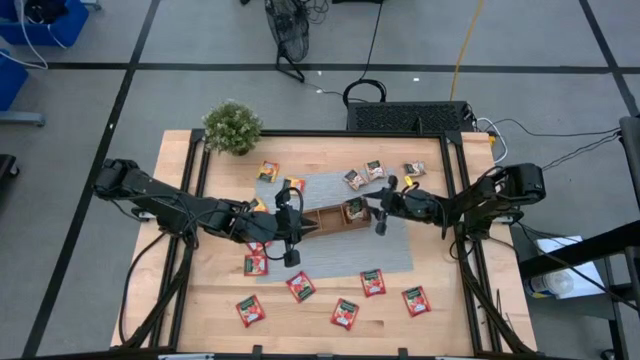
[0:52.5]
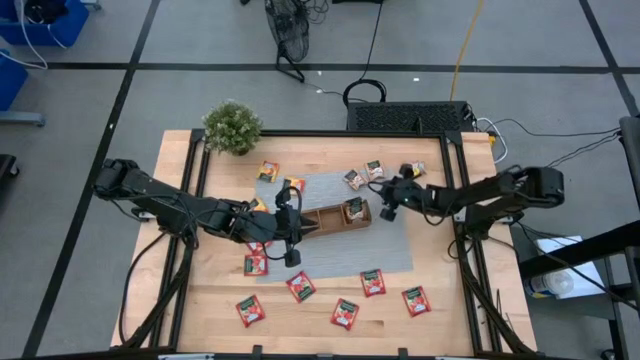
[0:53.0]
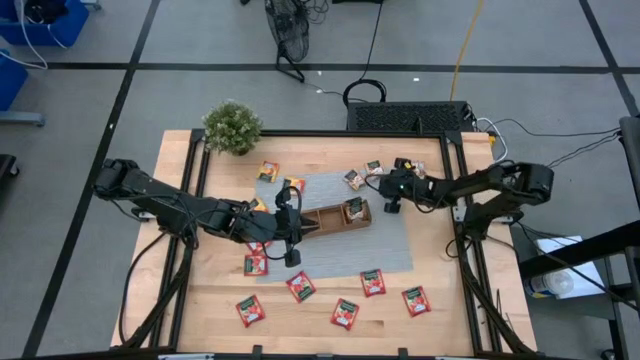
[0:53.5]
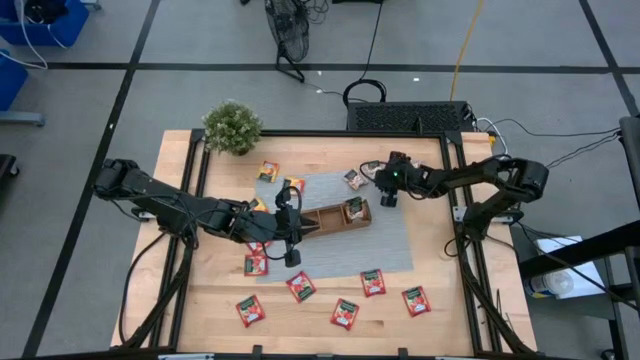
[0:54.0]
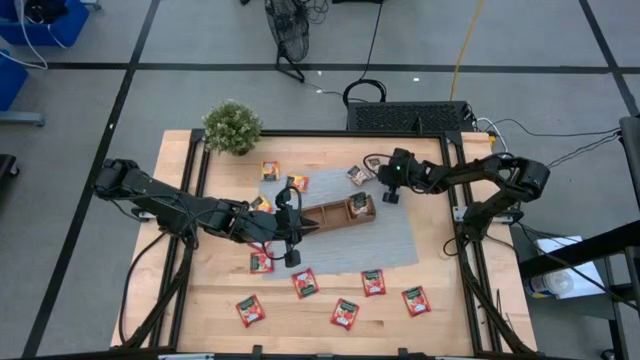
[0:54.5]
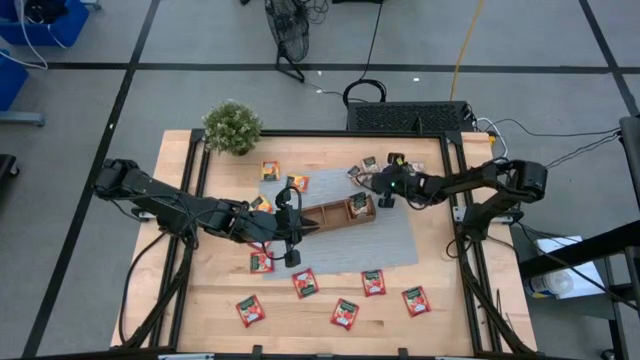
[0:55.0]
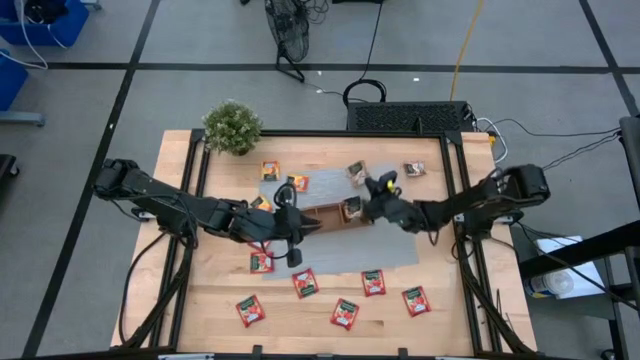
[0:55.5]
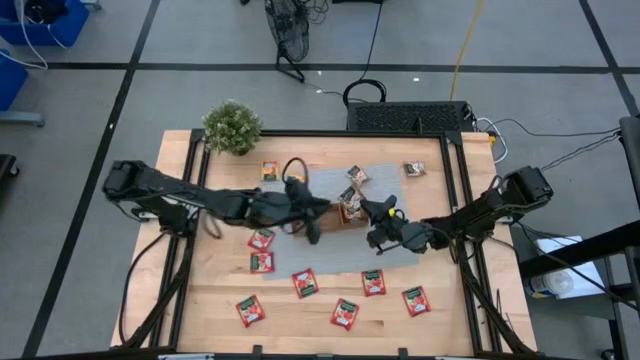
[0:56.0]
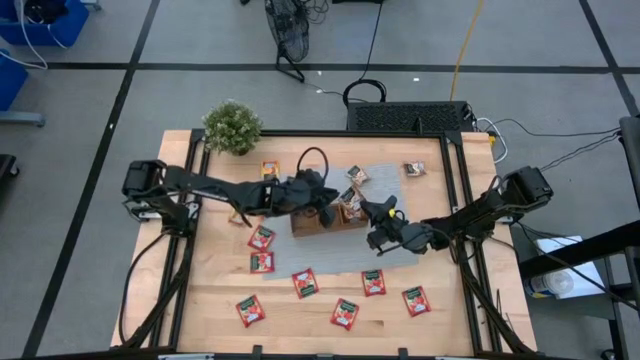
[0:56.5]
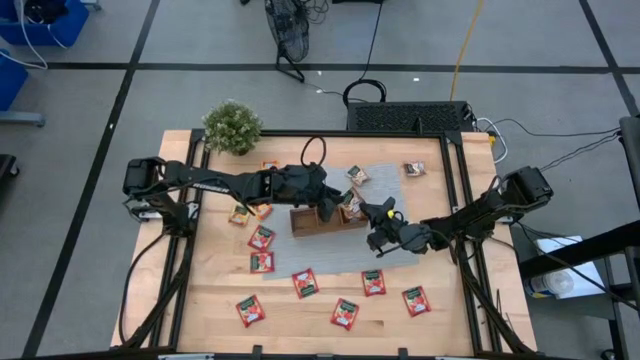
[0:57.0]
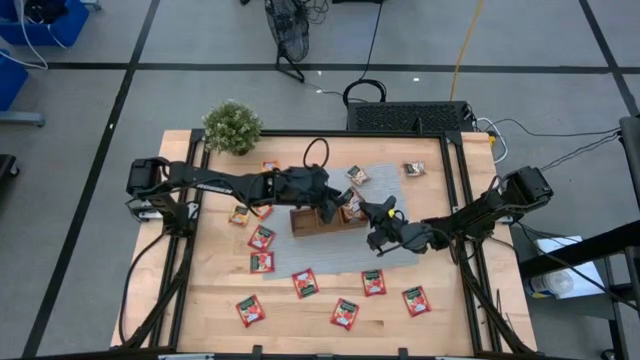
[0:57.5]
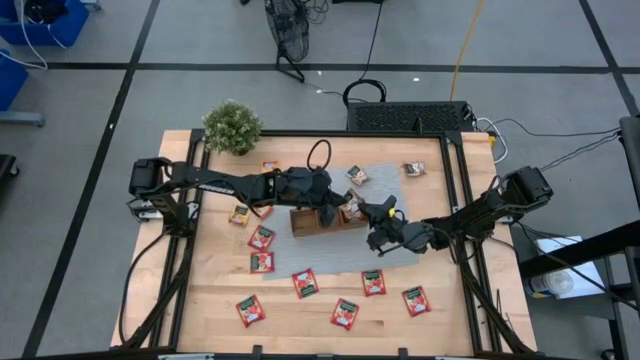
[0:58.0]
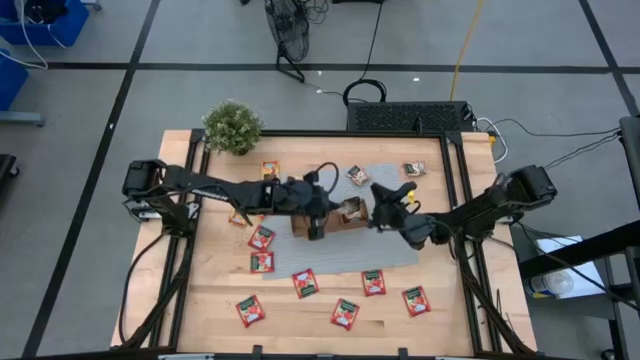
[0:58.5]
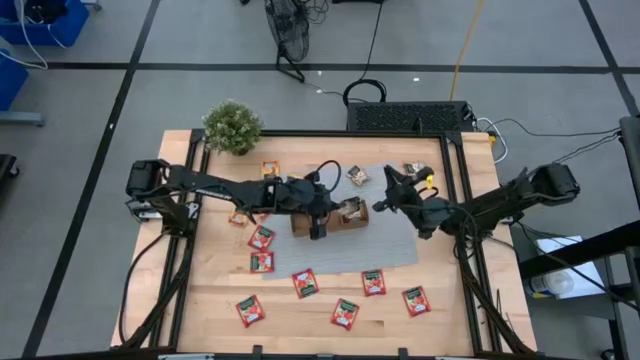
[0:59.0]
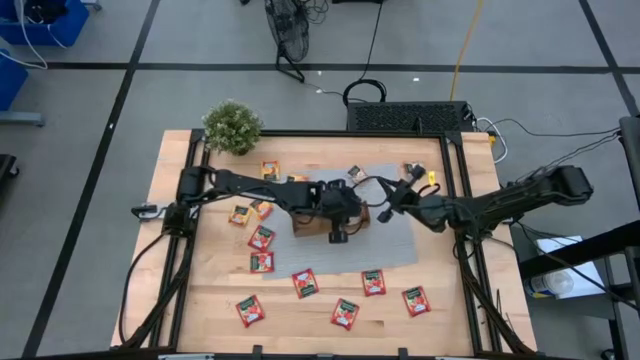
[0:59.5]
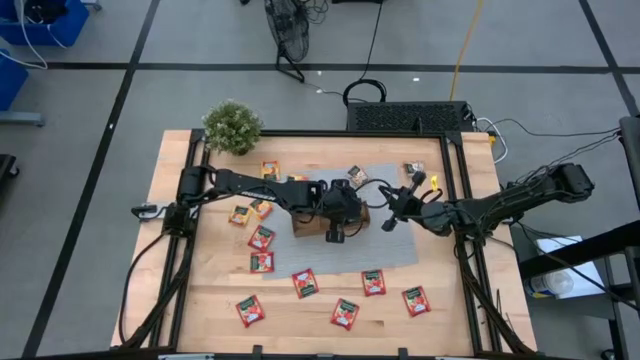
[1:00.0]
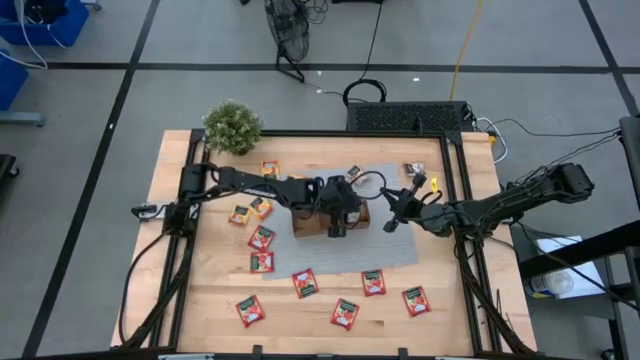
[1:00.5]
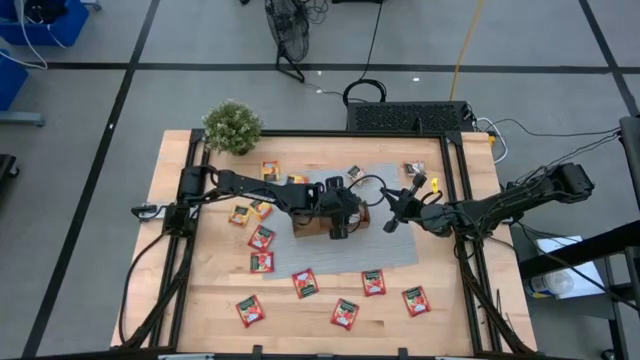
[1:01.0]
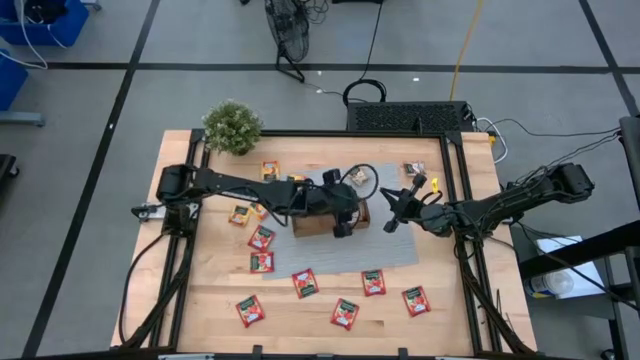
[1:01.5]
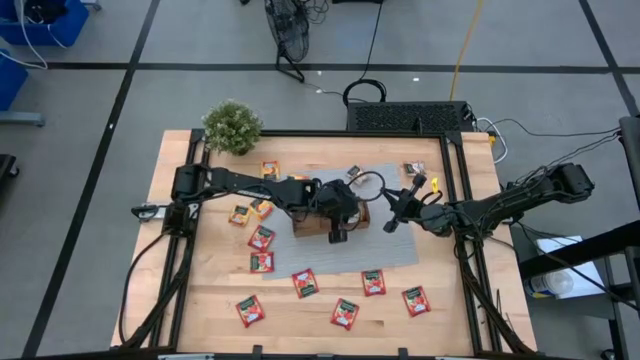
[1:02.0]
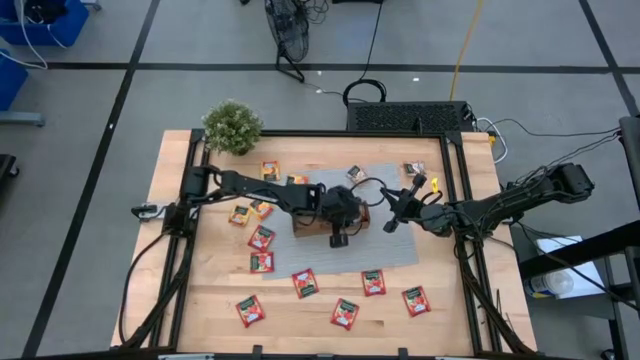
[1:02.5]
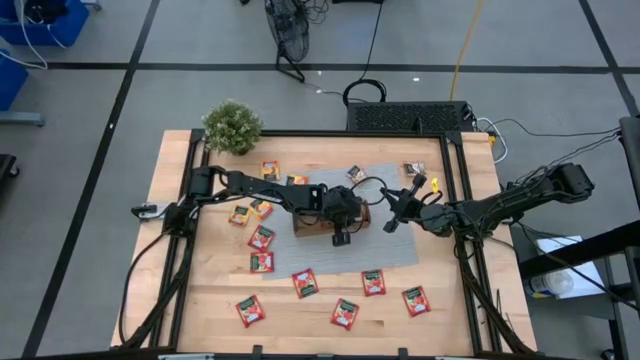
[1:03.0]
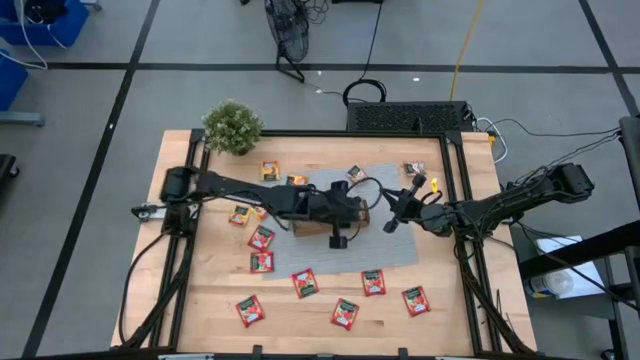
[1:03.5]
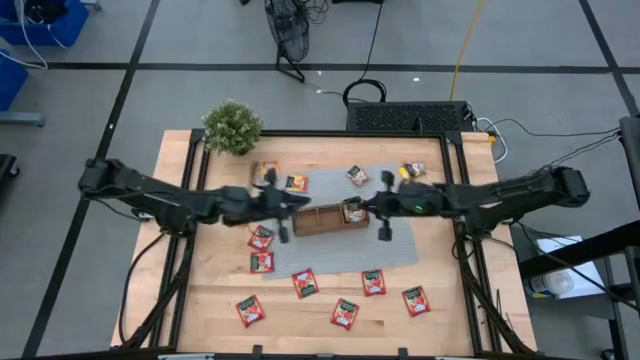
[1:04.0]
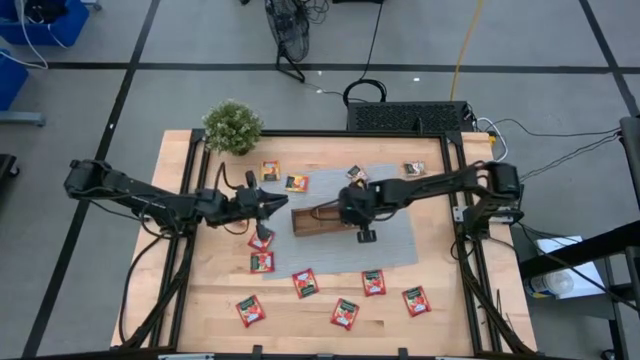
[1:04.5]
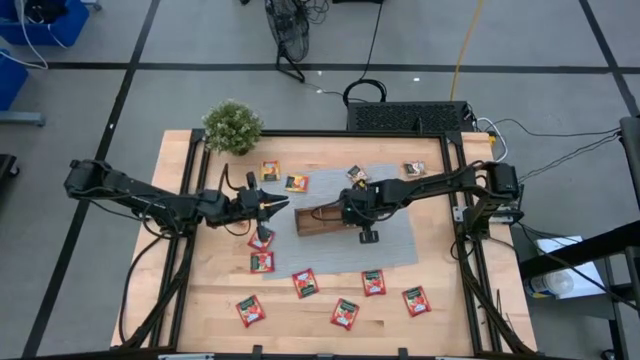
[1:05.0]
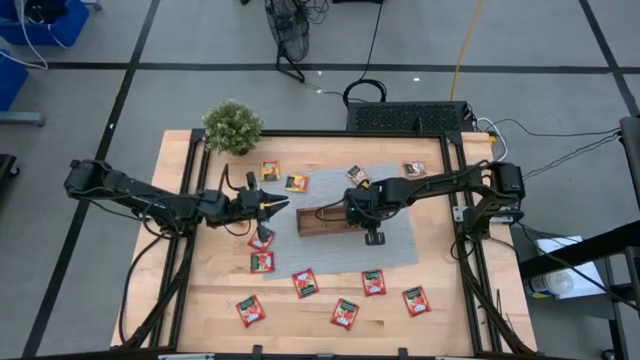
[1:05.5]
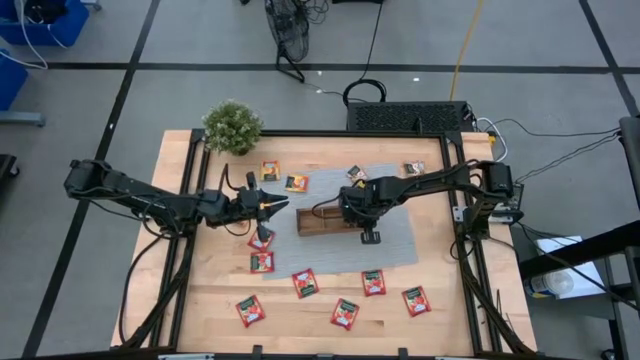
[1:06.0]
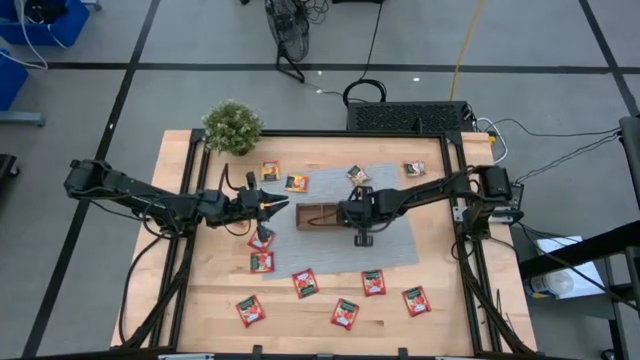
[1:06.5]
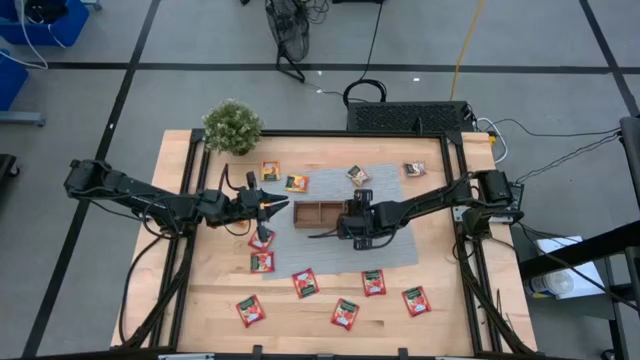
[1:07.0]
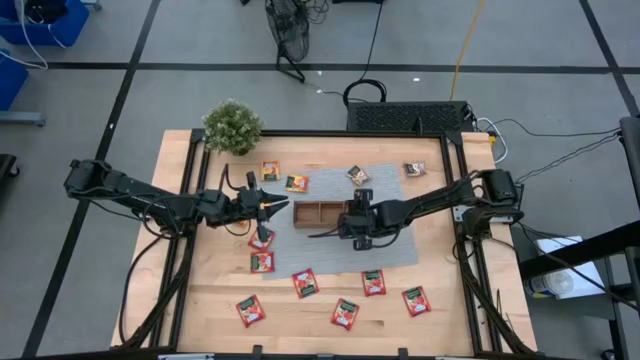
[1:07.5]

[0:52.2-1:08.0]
Task: Pick & Place Tea
Put the brown tea bag into the right section of the wooden organizer

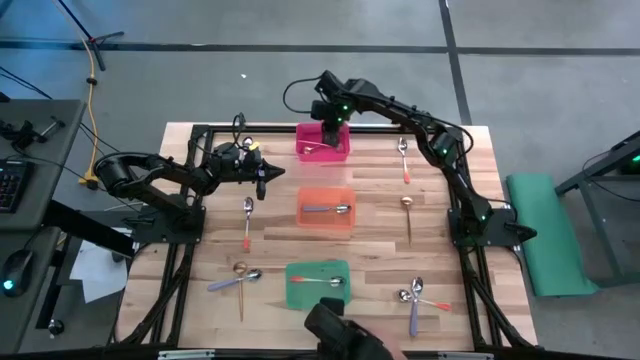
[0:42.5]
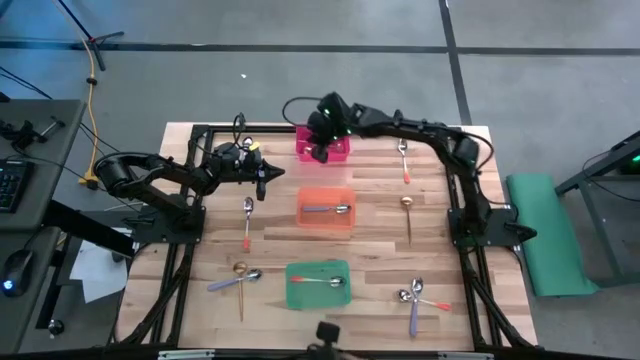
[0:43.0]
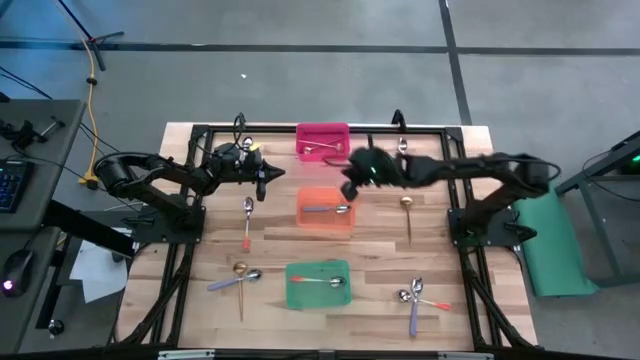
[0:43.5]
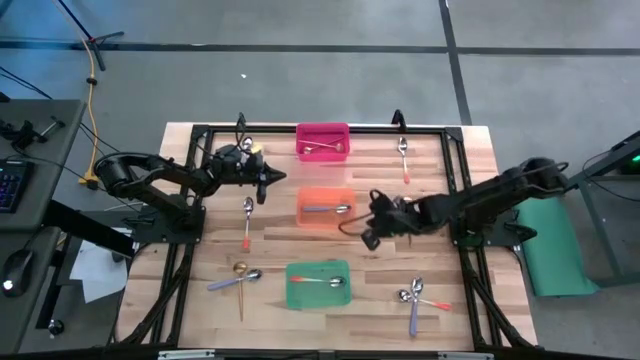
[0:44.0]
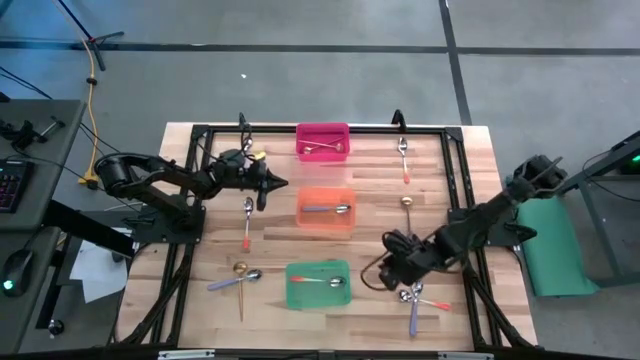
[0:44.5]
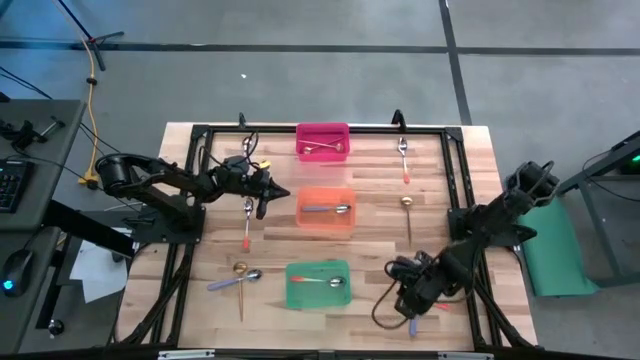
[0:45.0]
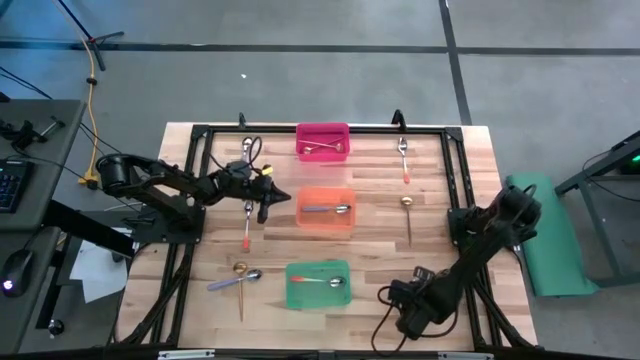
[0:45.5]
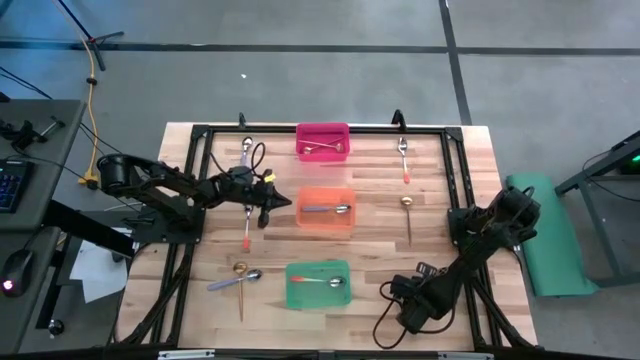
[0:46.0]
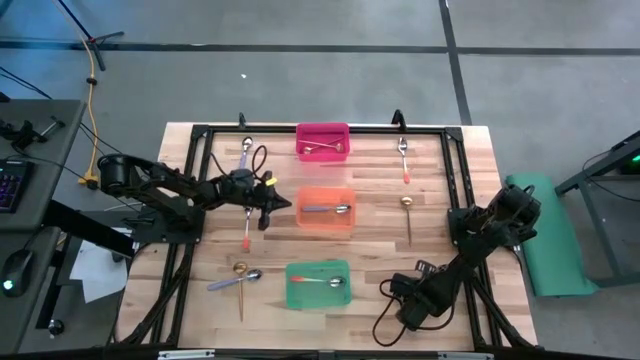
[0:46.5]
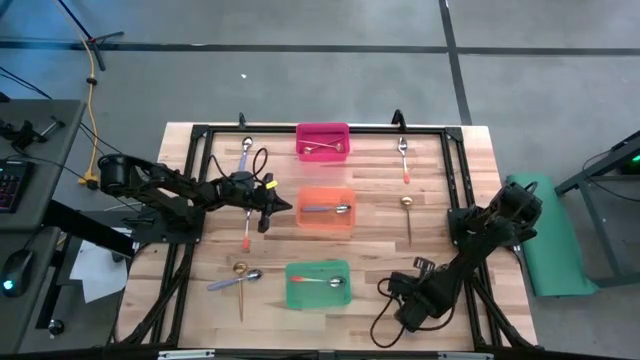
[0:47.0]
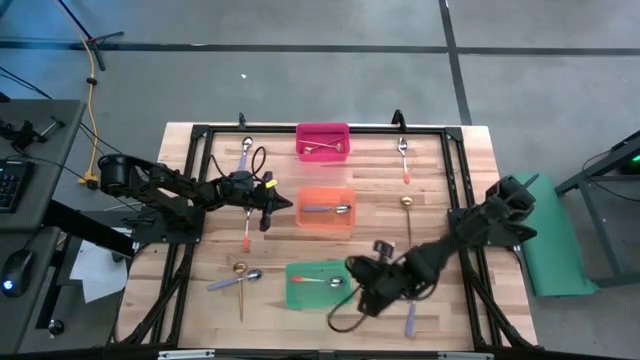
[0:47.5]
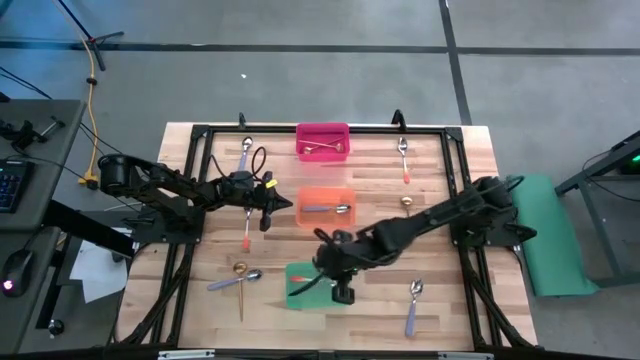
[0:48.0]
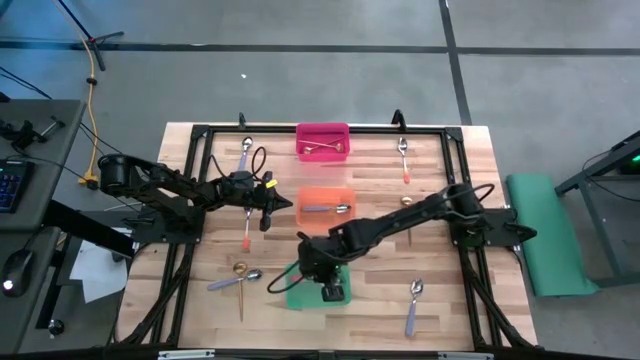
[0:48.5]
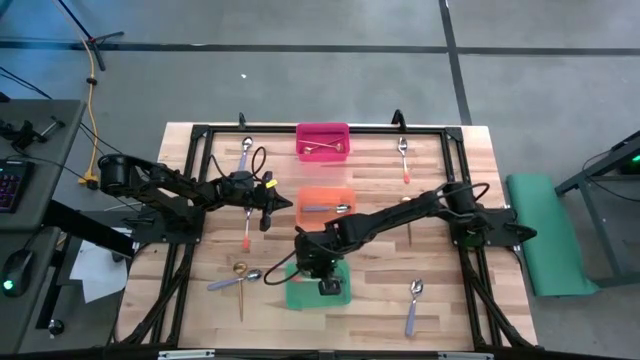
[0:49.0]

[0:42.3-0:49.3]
Task: Sort silverware by color (type)
Put the bottom right orange spoon into the green bin
